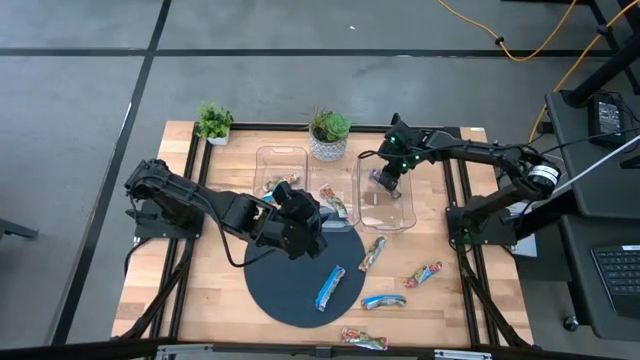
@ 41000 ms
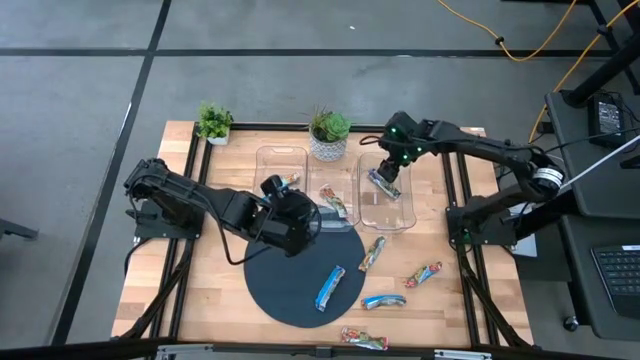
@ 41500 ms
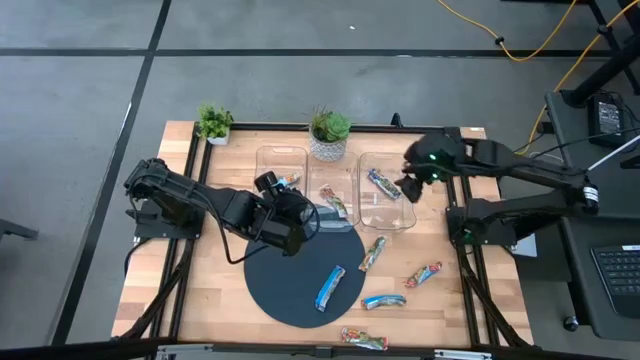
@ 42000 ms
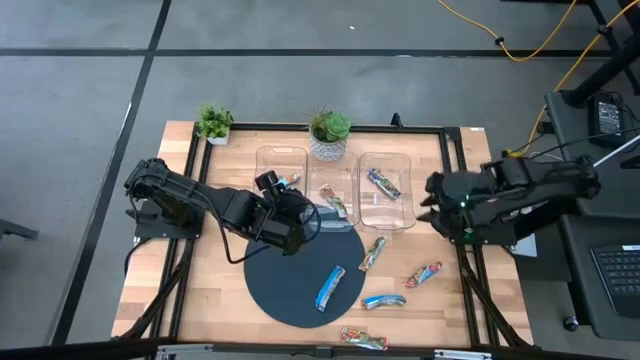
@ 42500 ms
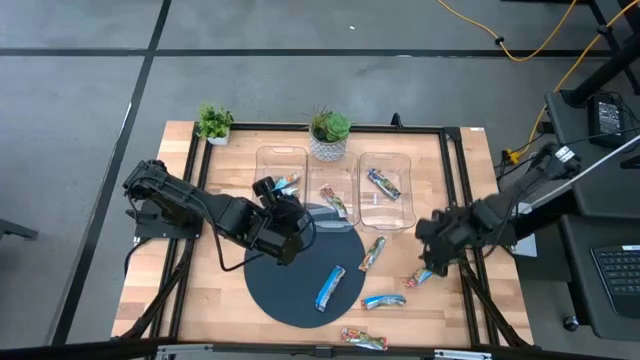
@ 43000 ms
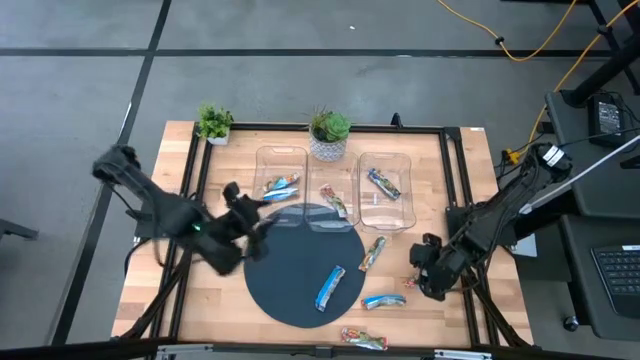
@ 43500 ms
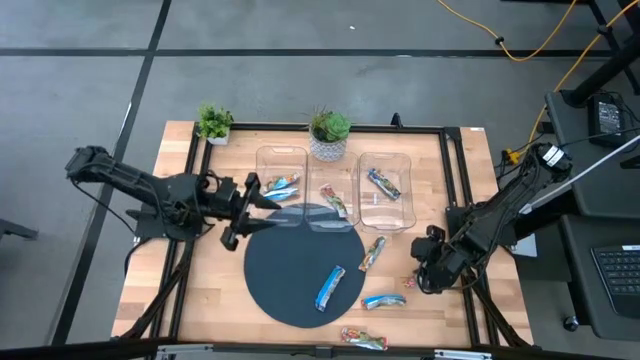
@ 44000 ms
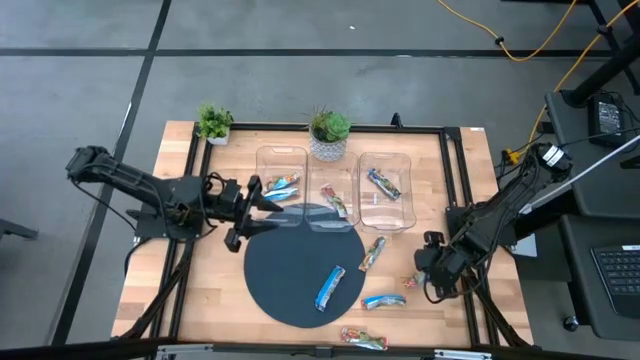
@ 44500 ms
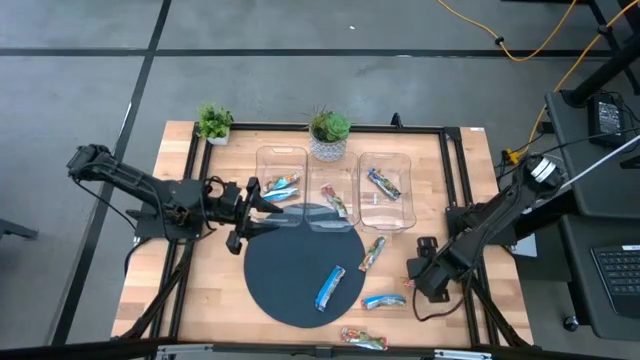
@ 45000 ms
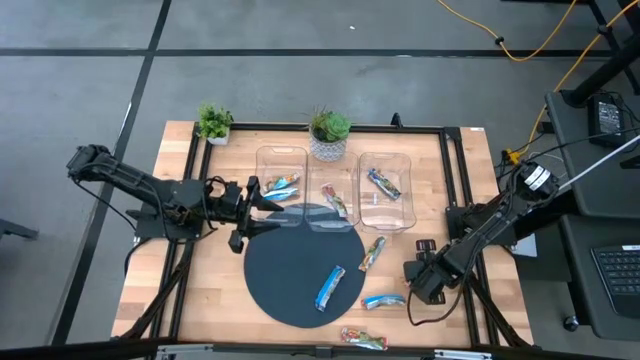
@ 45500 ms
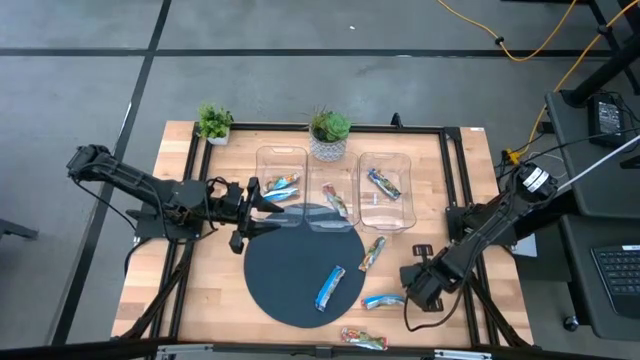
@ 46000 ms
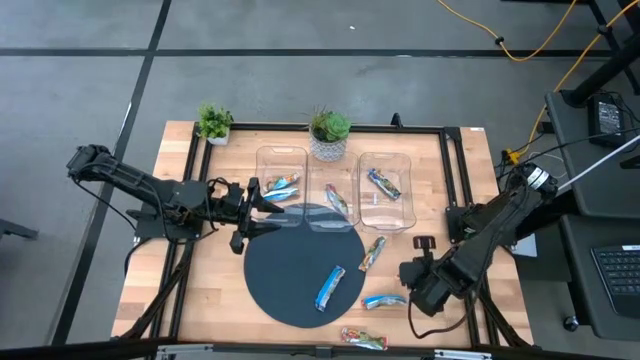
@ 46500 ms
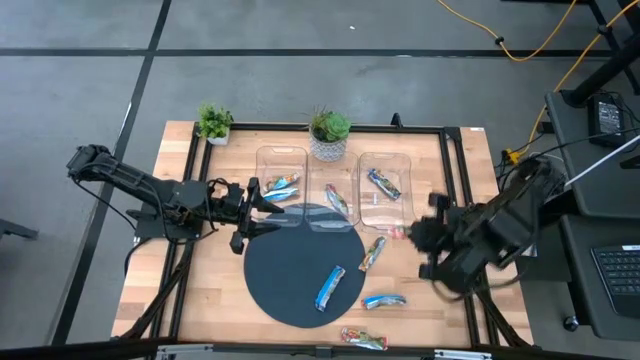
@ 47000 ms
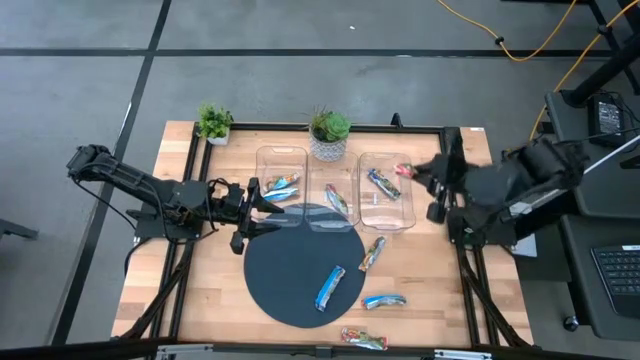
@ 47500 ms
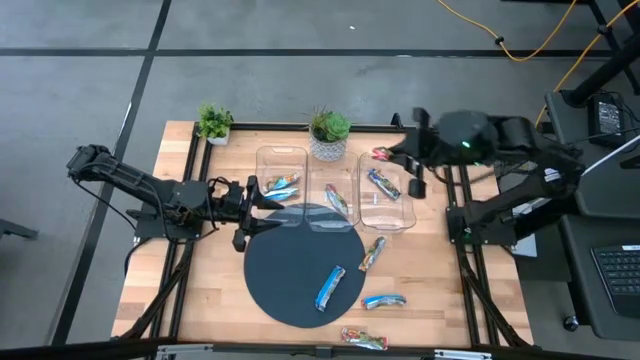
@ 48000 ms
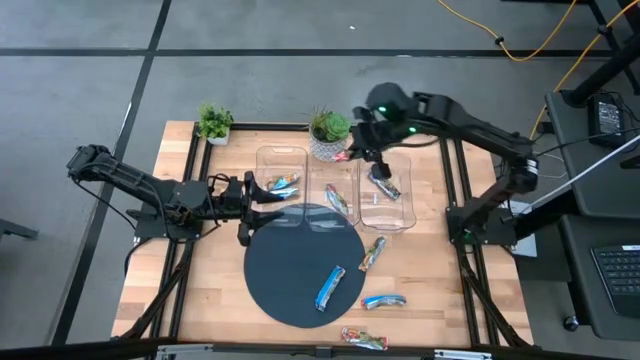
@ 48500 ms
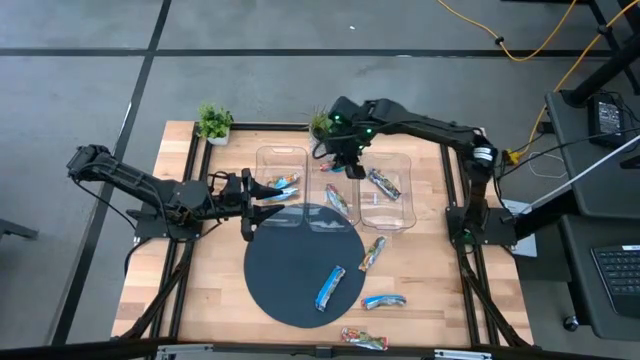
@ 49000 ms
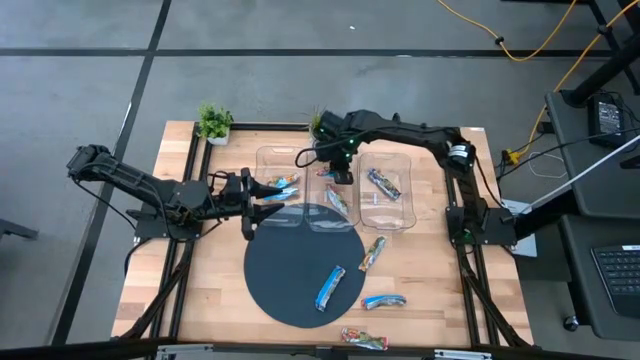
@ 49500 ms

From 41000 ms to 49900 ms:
Task: Pick and place Granola Bars by type
Put the red granola bar into the middle transparent bin

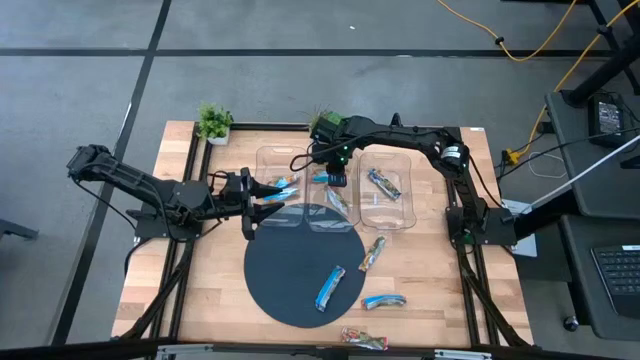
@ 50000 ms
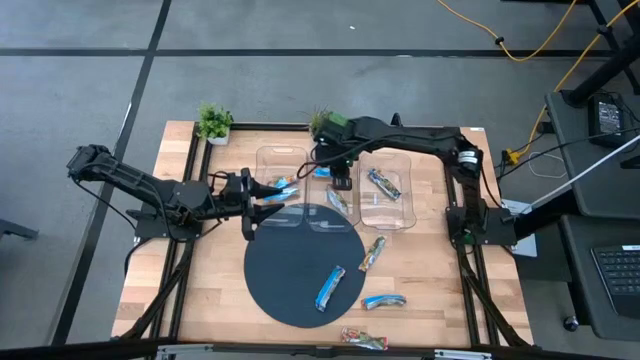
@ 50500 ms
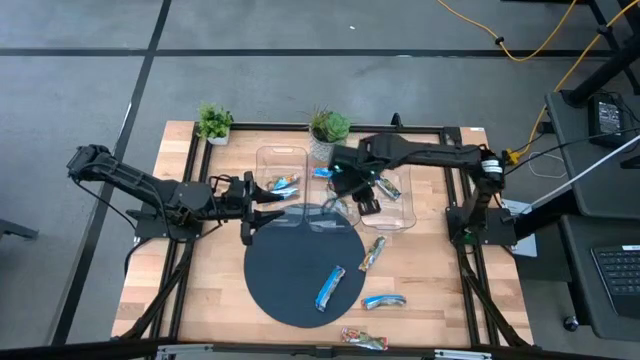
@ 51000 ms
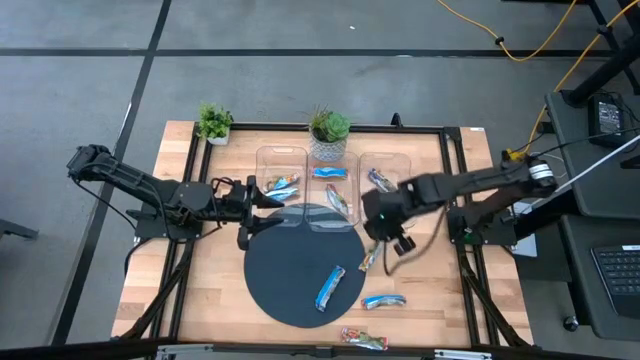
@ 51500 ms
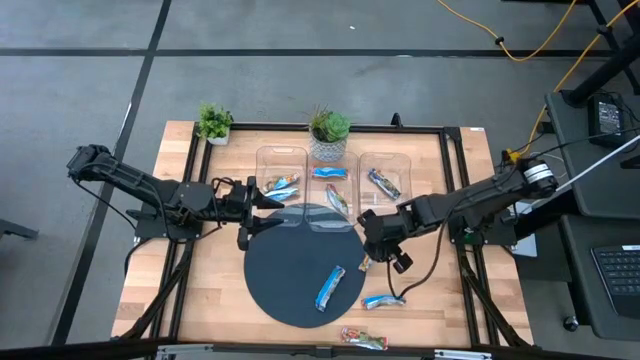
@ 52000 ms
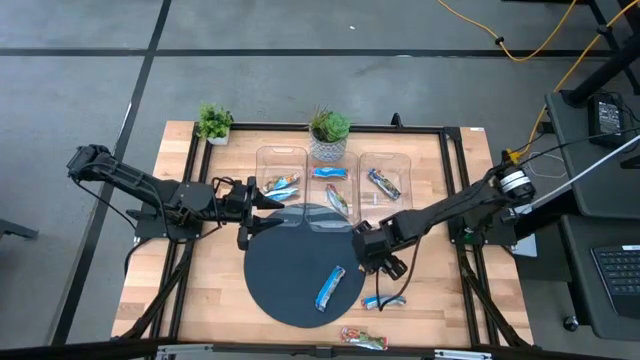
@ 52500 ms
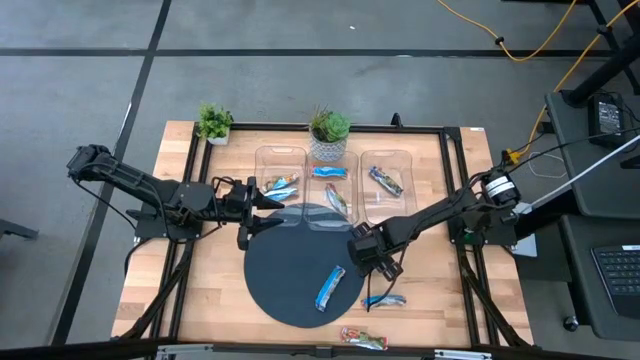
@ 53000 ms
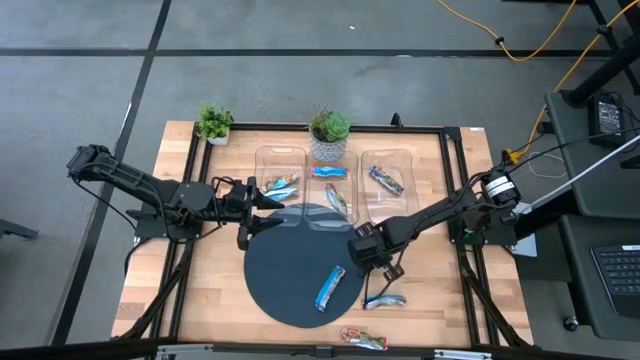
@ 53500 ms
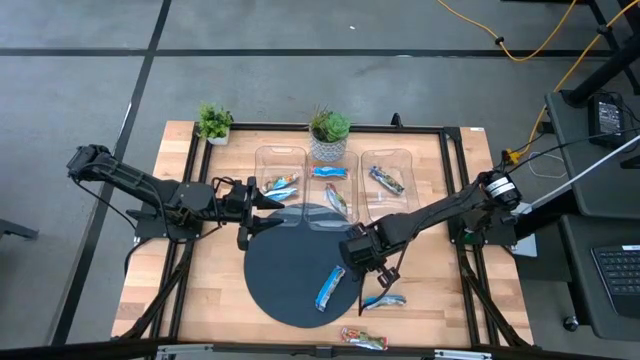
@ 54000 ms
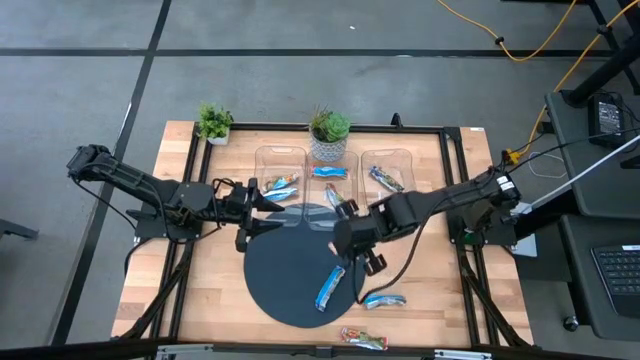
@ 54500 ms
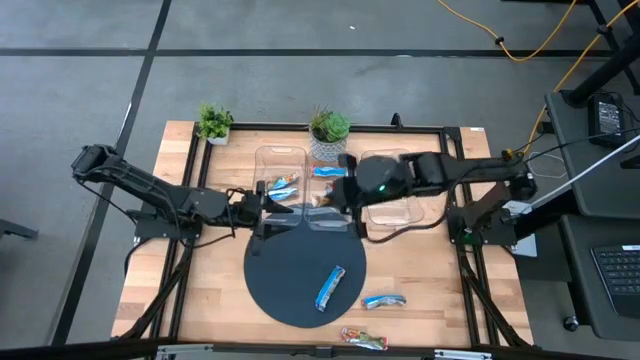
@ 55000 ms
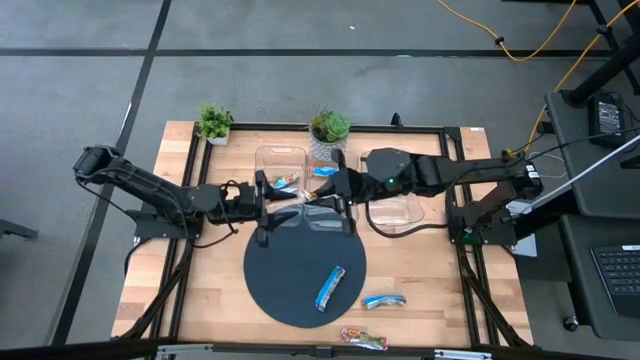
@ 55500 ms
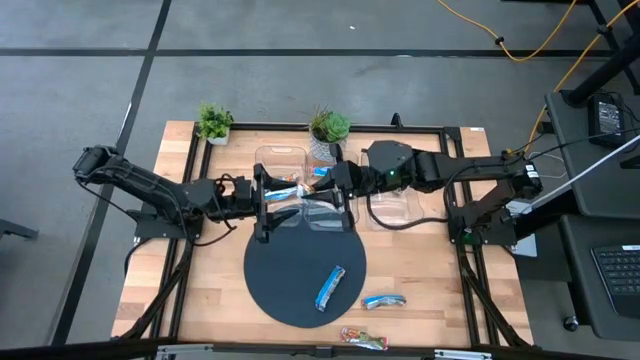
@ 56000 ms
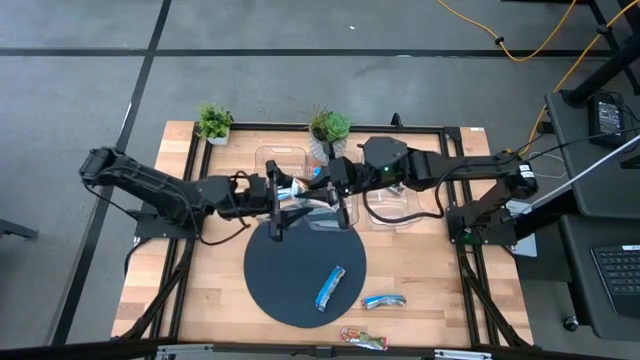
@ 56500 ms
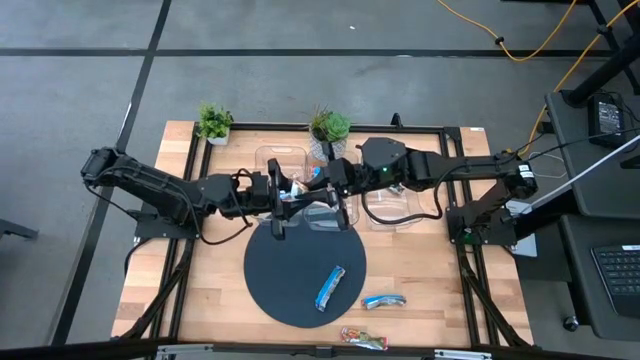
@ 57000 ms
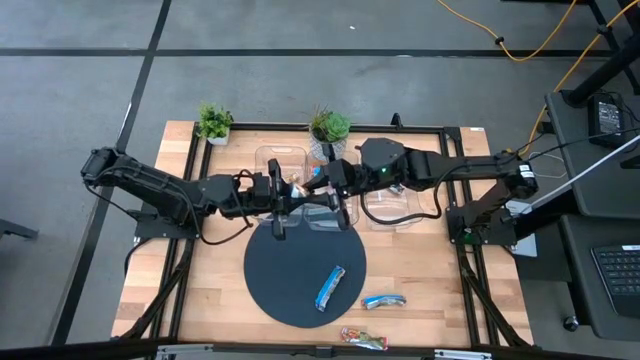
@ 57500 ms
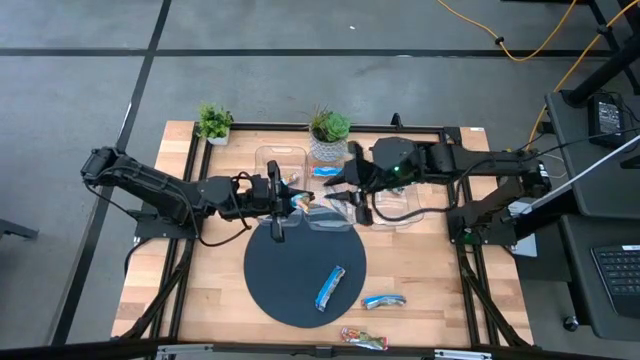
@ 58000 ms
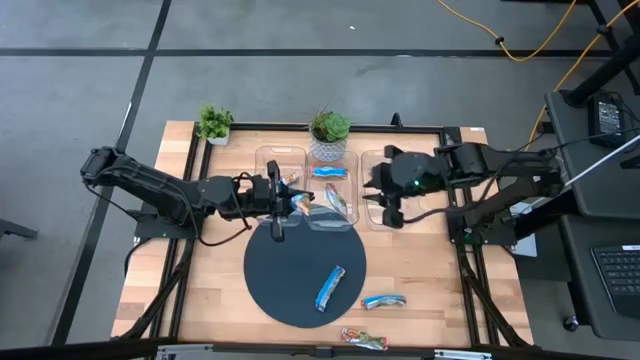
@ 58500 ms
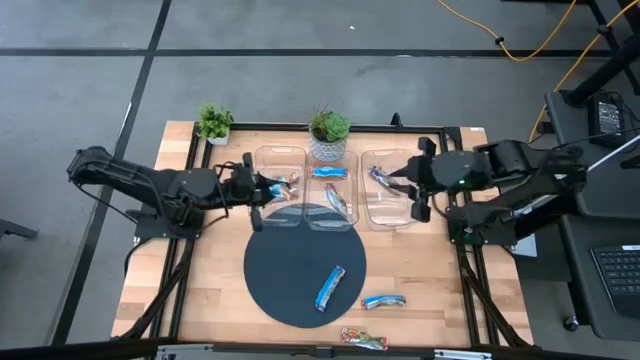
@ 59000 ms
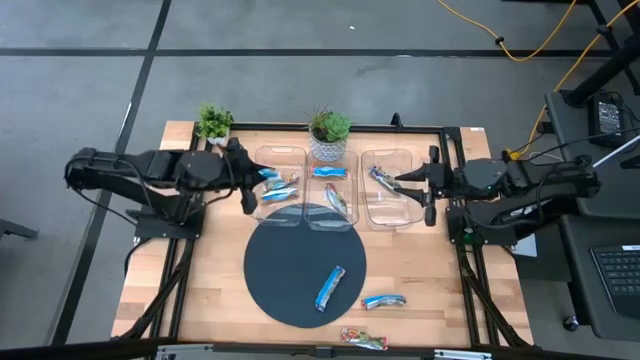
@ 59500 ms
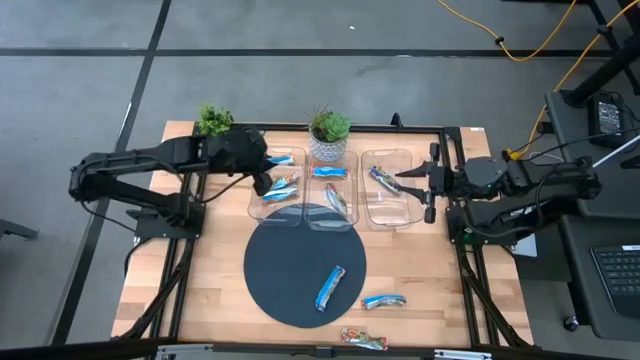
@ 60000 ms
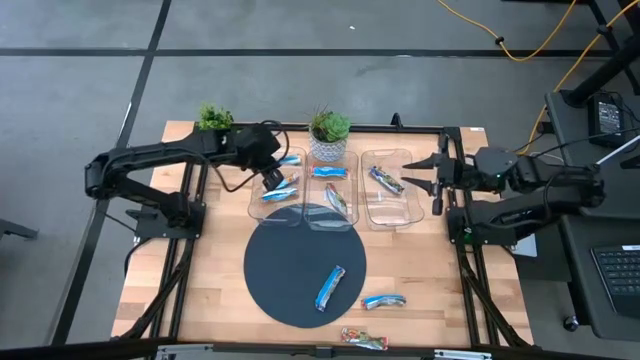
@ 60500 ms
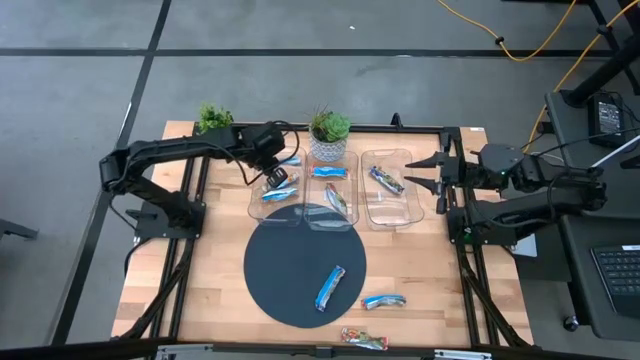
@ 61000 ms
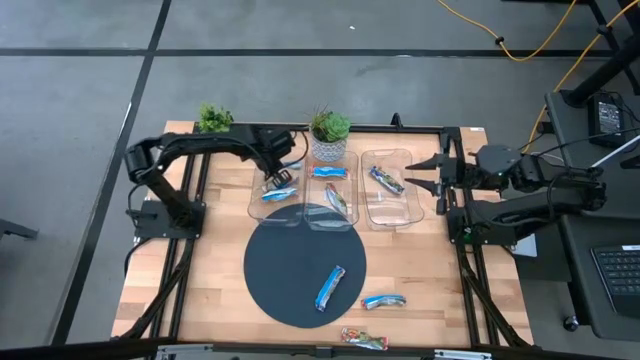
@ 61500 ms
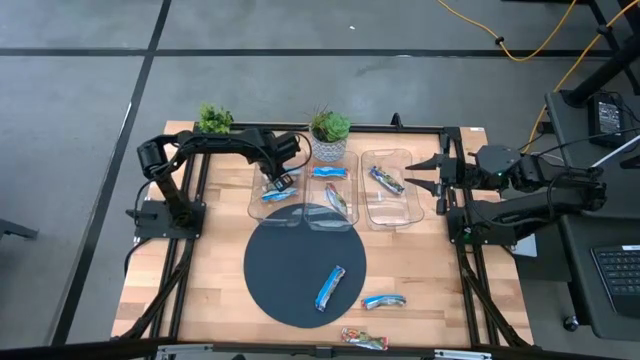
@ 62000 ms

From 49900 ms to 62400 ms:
Put the yellow granola bar into the left transparent bin
